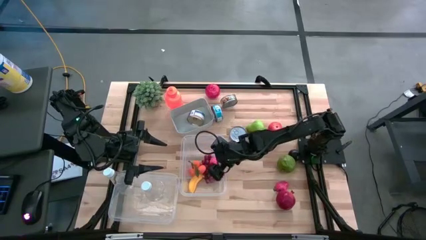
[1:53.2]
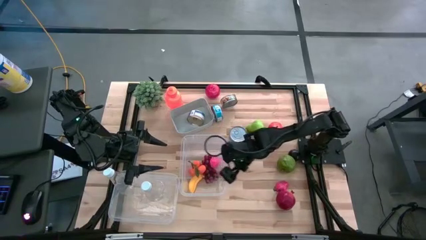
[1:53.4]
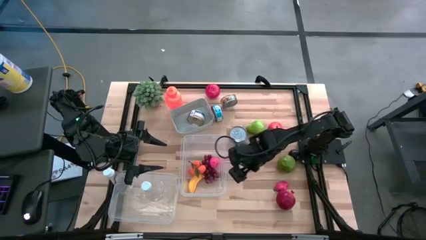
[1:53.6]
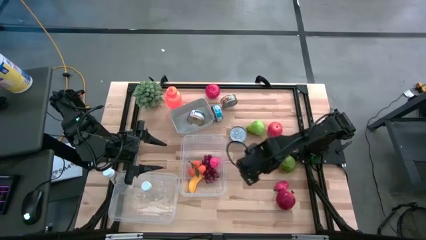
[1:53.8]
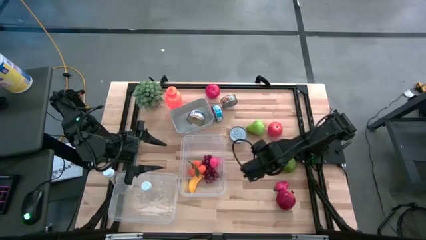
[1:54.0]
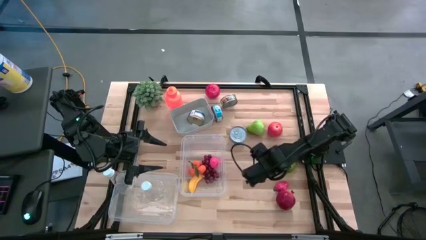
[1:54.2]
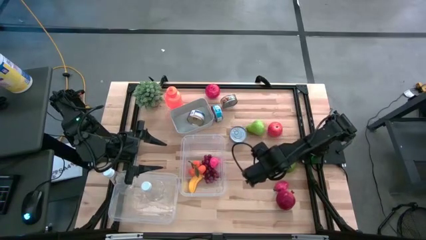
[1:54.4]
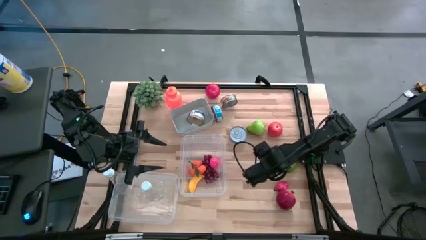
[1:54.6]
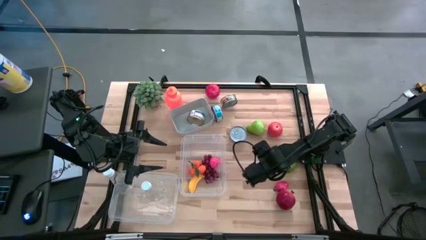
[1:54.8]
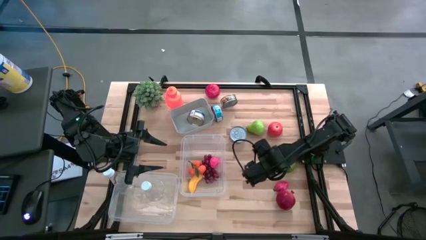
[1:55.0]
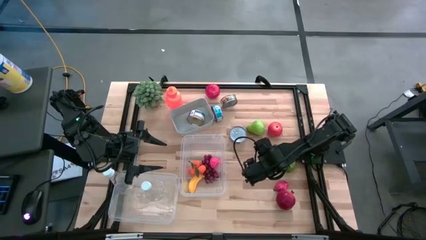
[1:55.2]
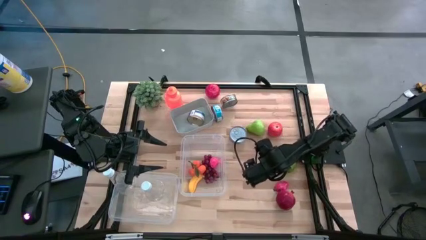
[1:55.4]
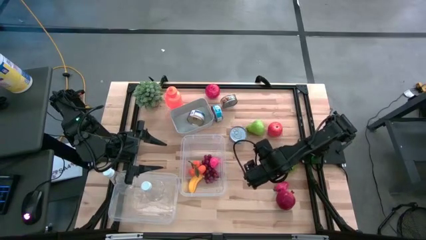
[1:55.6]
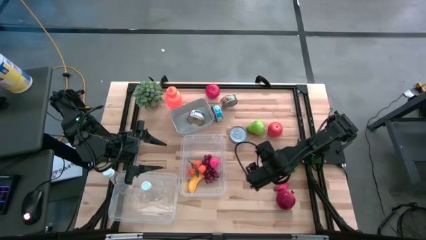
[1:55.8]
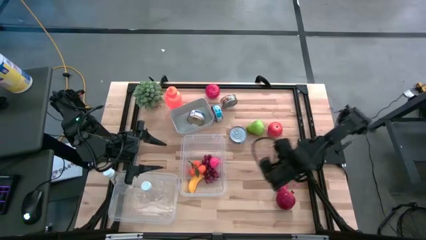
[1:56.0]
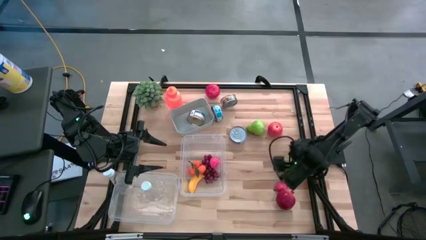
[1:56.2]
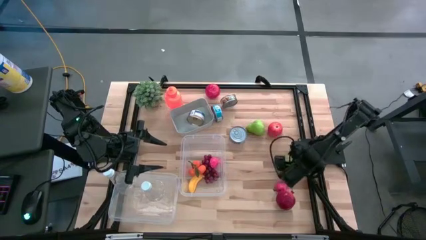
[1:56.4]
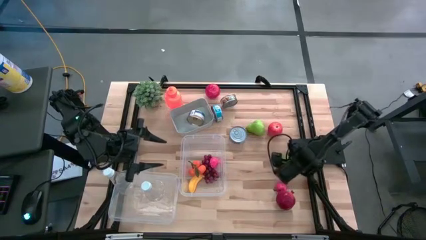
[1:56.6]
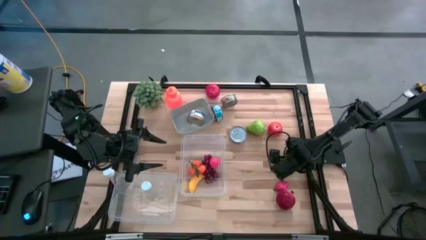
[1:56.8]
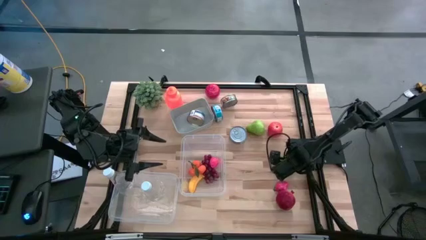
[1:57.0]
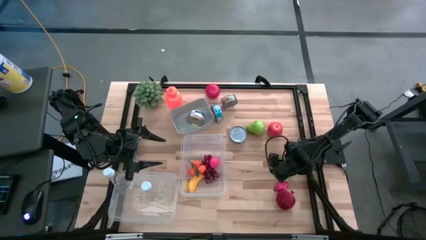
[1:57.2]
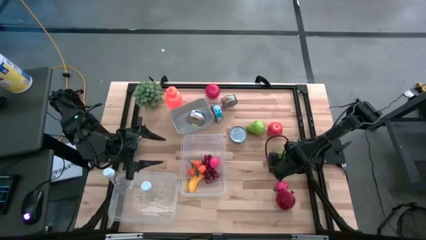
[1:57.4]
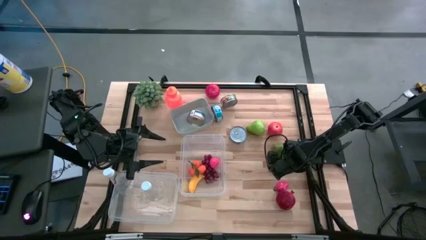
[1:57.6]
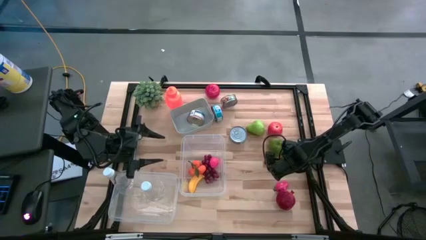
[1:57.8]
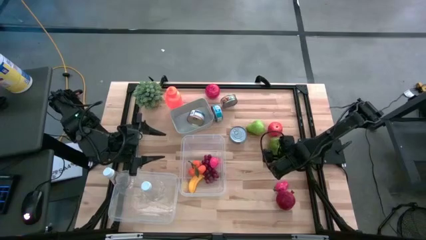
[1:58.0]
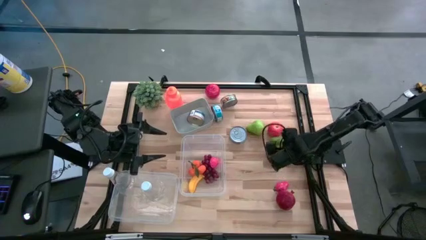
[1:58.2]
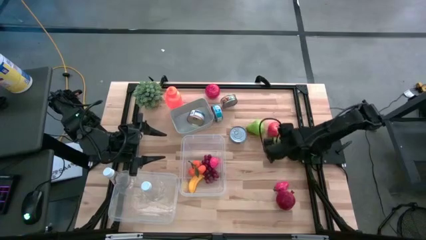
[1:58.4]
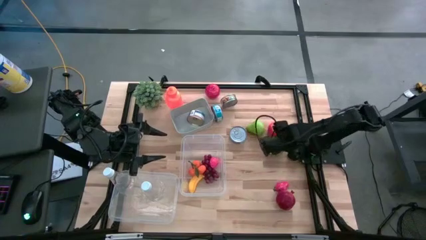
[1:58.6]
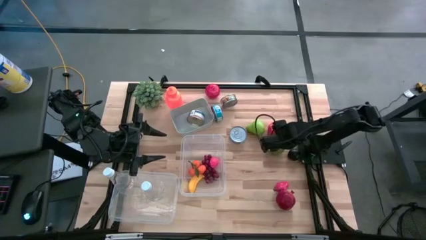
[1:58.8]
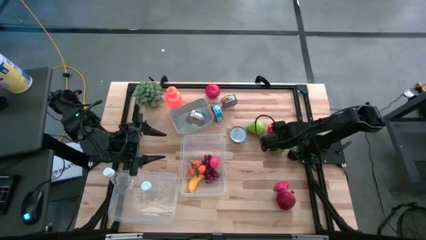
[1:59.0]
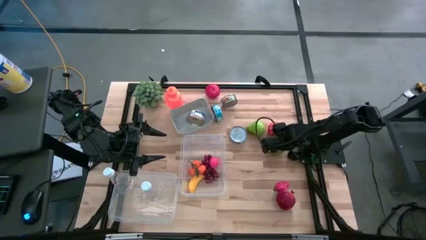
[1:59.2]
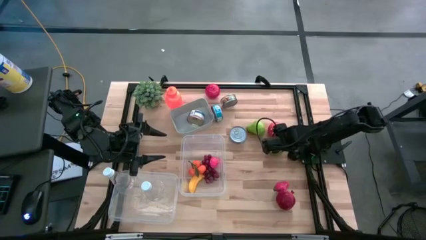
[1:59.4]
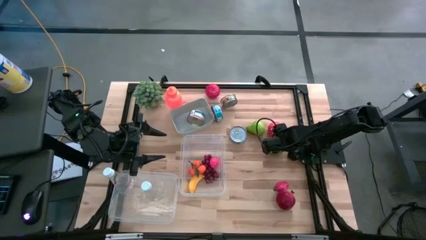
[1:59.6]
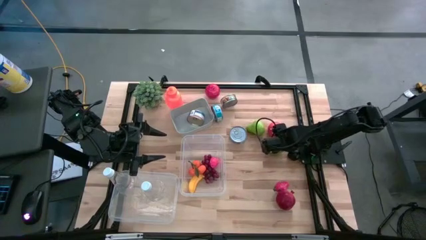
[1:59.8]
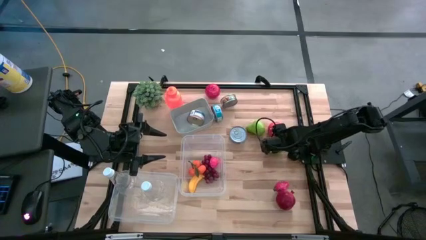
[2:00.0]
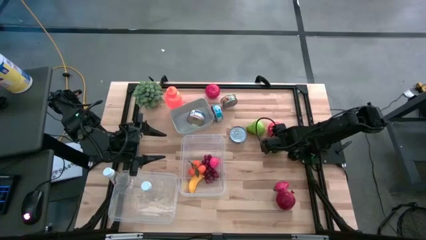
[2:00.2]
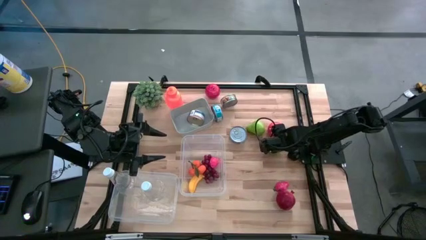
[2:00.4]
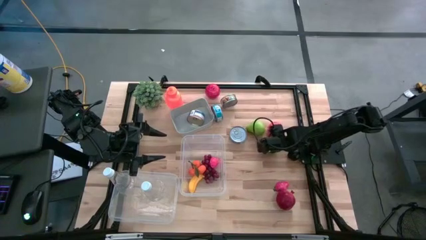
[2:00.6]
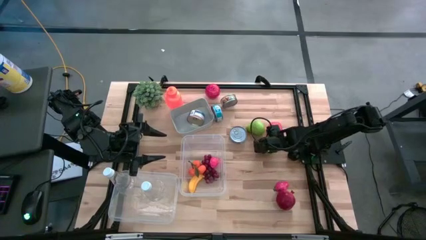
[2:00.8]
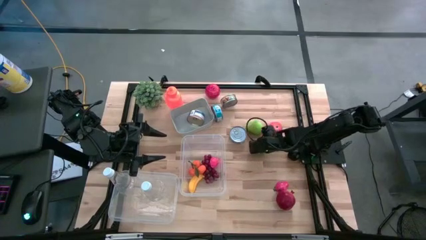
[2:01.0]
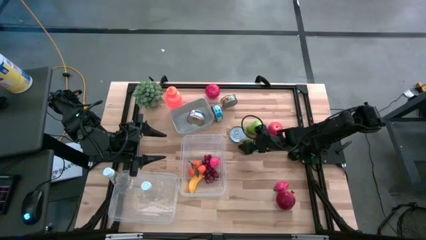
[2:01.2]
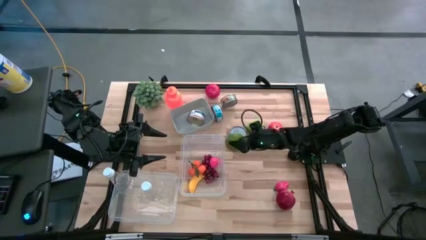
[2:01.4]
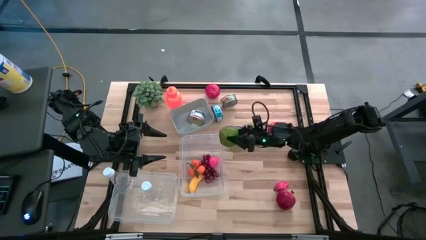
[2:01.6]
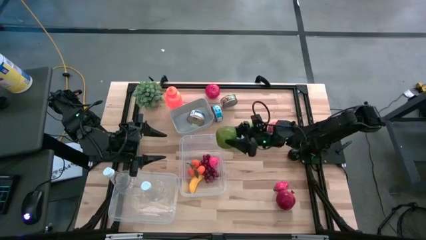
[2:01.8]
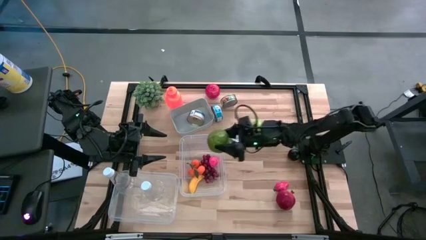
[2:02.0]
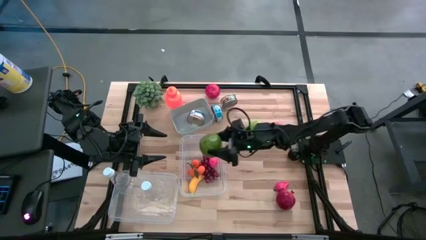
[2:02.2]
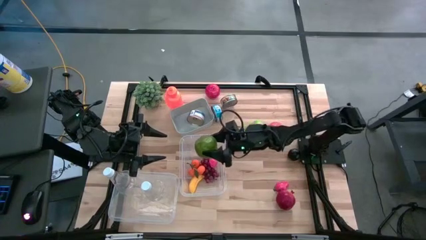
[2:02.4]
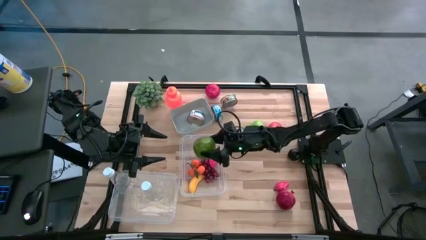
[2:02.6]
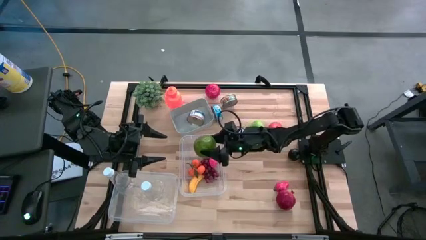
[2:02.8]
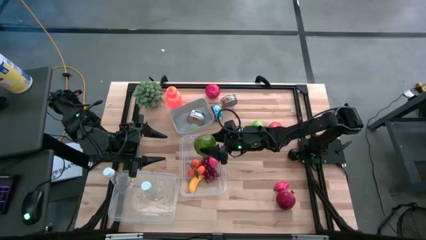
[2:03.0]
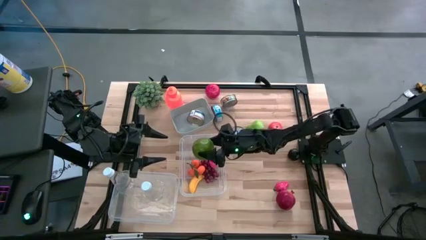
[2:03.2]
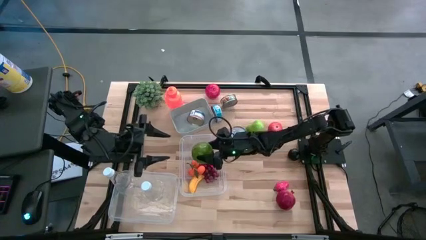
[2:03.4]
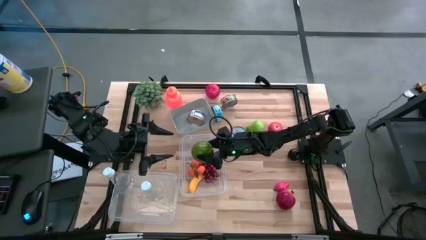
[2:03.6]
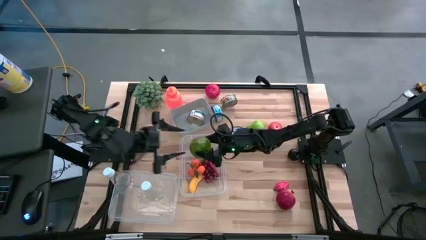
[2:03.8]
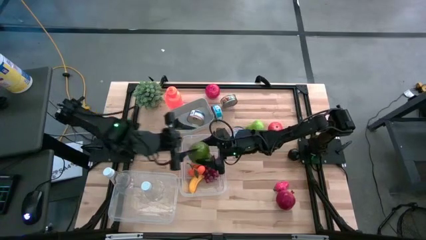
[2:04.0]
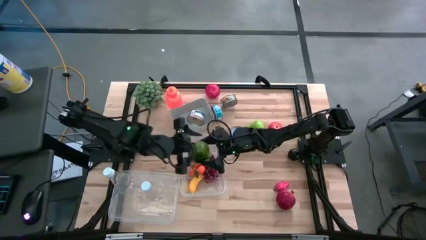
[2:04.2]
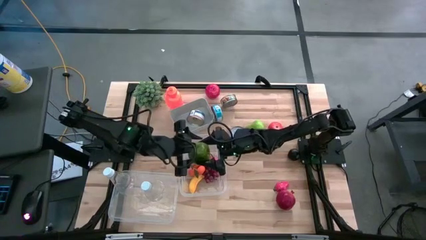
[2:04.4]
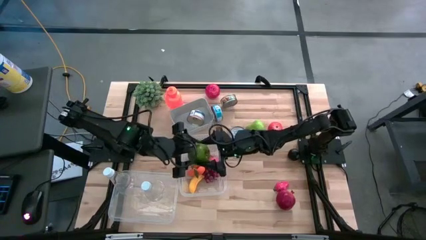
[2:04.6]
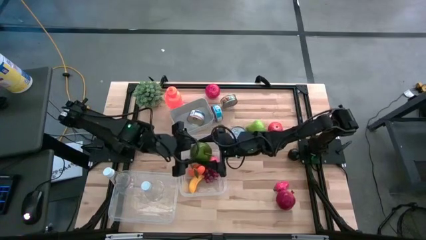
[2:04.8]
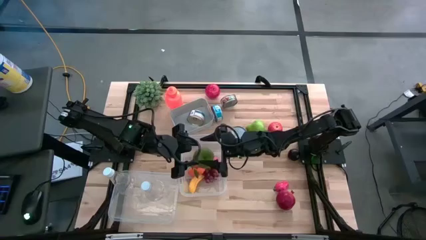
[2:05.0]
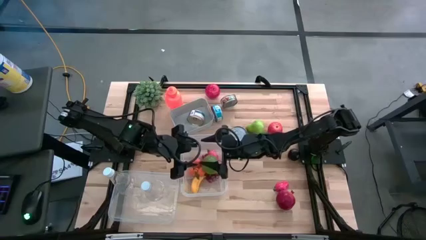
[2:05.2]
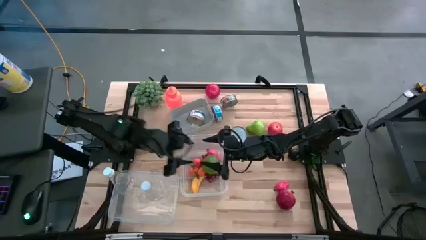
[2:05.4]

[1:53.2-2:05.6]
Task: Pick & Place Food Item
Put the green apple into the right transparent bin

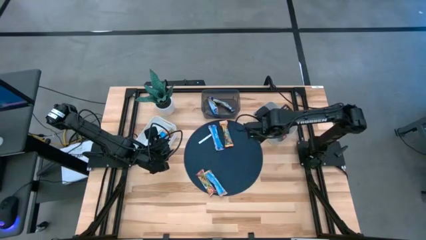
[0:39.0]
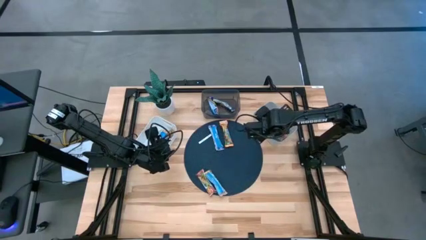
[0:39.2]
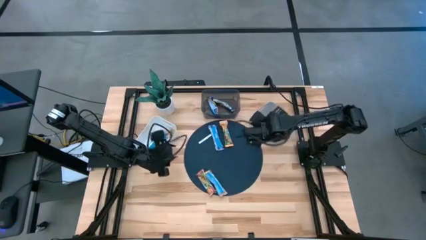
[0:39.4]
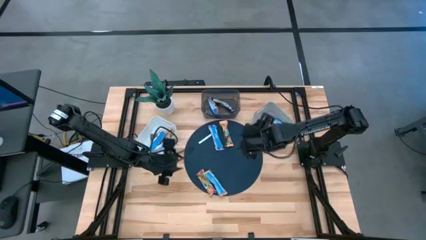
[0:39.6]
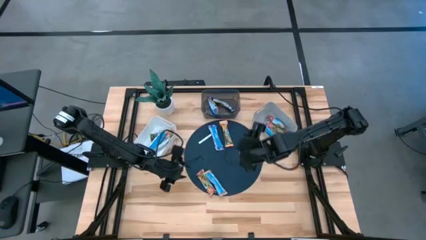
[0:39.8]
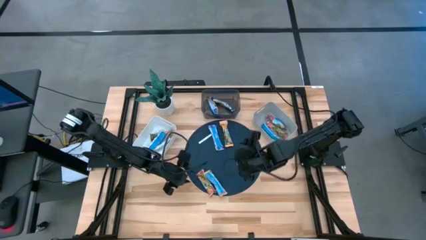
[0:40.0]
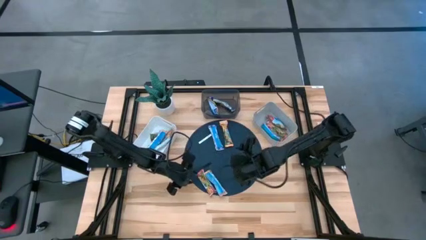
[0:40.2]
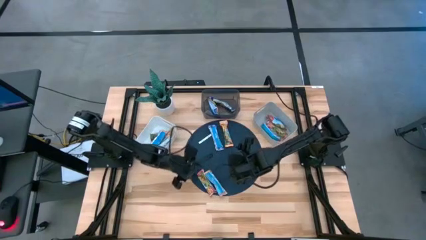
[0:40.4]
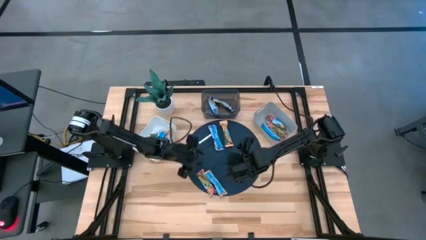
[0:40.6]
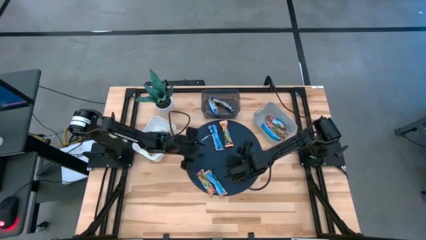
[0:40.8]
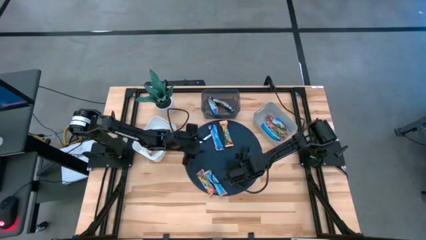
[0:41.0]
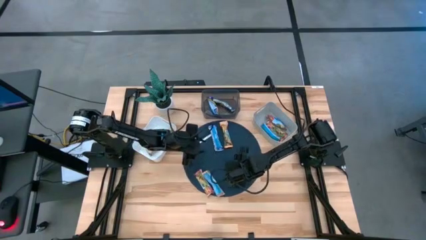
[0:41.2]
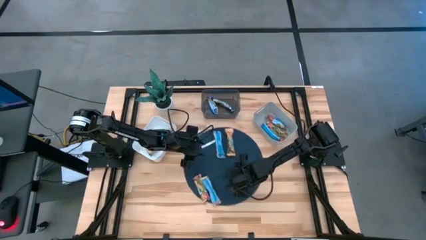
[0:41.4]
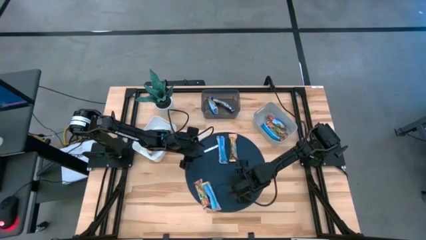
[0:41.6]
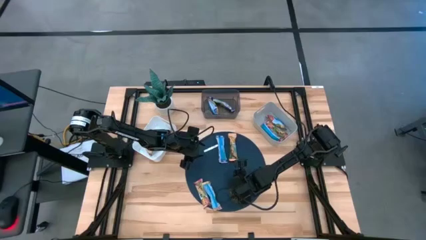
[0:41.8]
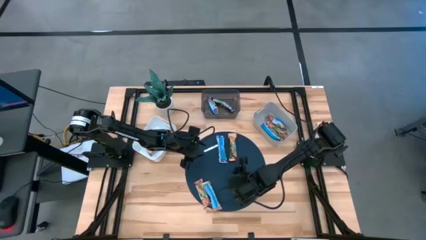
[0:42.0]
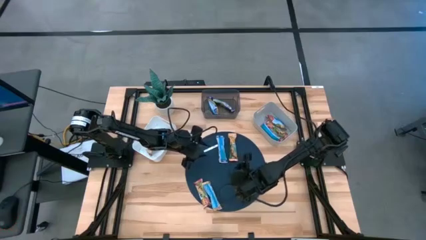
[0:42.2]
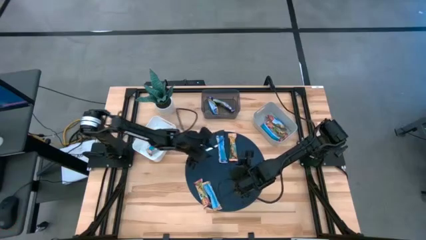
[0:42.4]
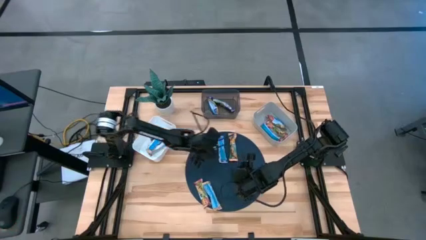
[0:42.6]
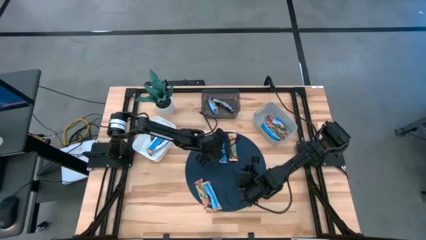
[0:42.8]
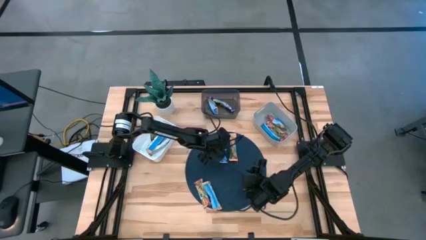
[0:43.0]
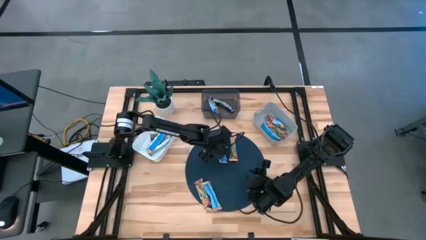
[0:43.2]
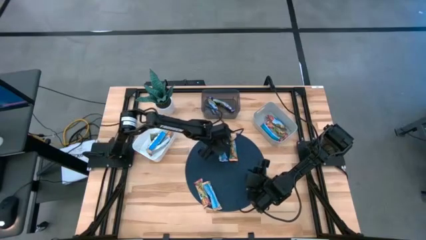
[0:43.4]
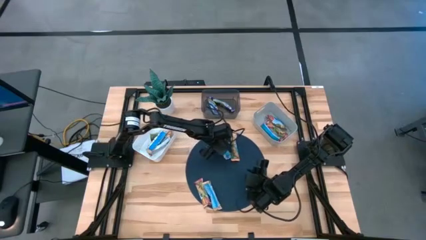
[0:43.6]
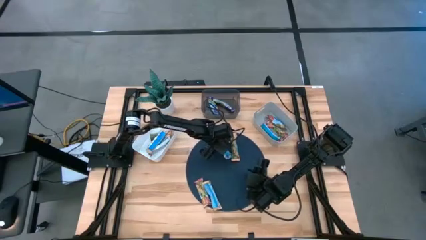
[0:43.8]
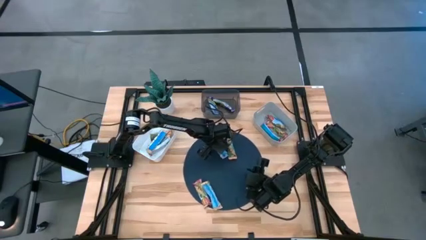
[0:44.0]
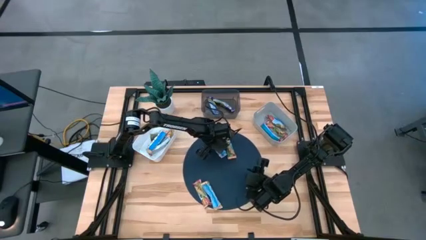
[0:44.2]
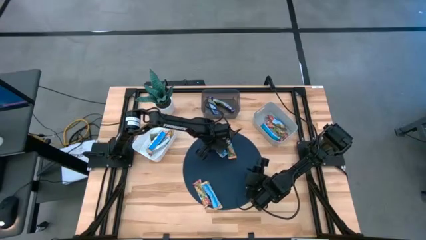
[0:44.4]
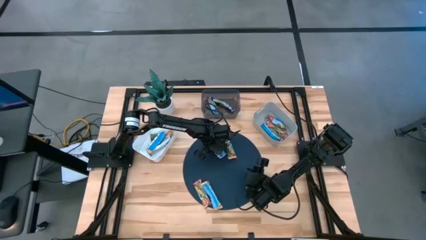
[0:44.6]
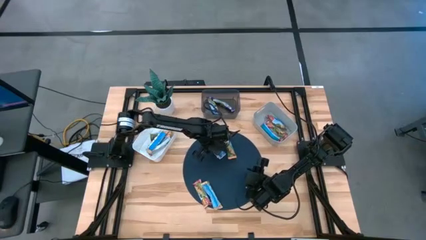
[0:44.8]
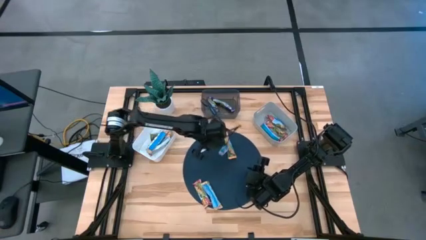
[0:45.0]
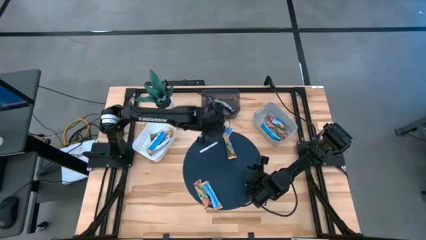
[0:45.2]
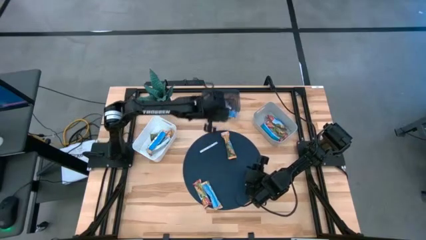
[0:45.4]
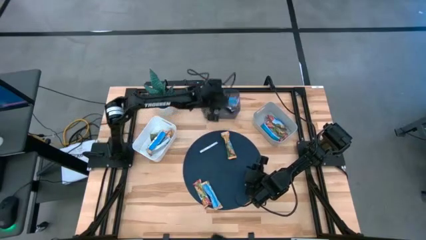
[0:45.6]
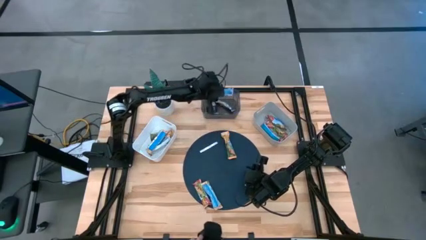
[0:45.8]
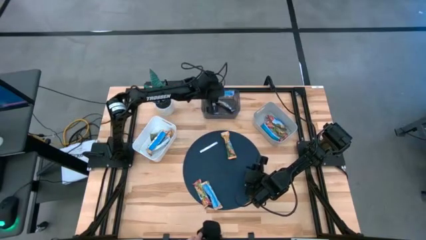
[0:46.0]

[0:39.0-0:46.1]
Task: Pick and place Granola Bars by type
Put the blue granola bar into the black bin
